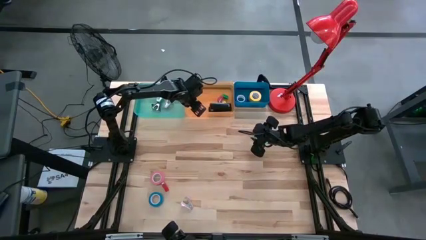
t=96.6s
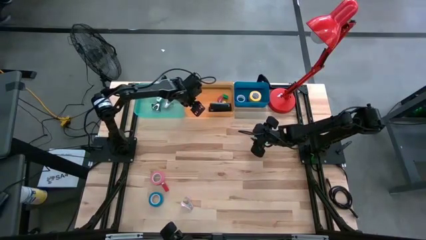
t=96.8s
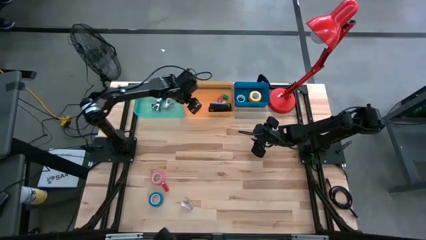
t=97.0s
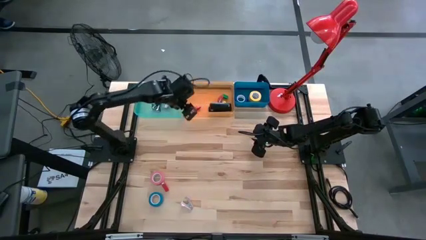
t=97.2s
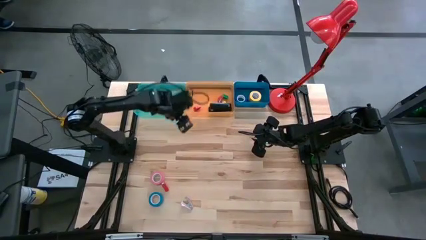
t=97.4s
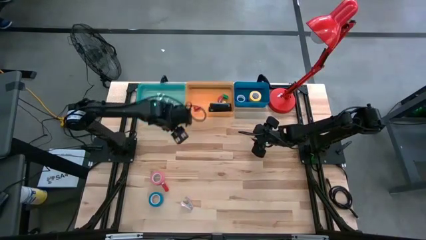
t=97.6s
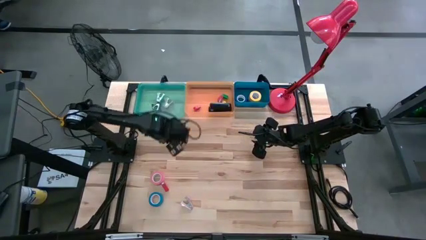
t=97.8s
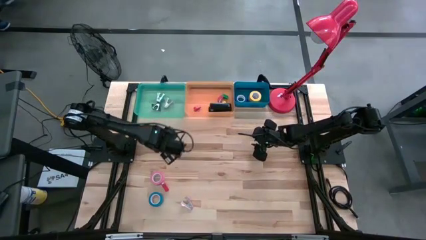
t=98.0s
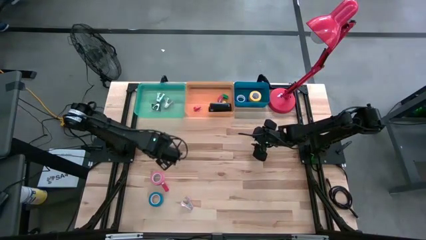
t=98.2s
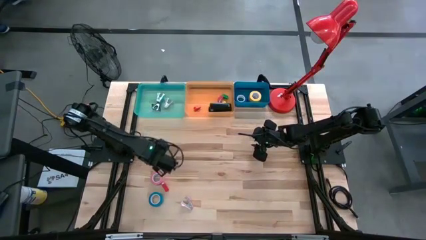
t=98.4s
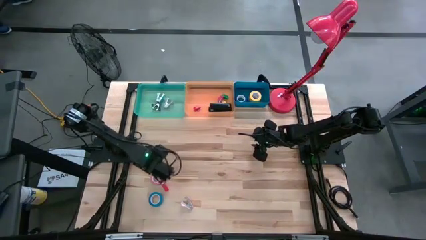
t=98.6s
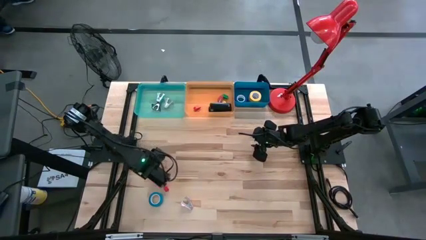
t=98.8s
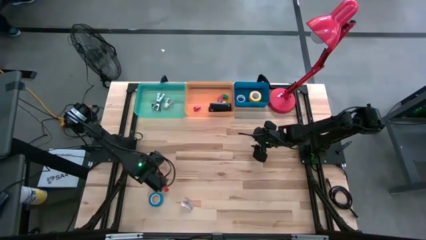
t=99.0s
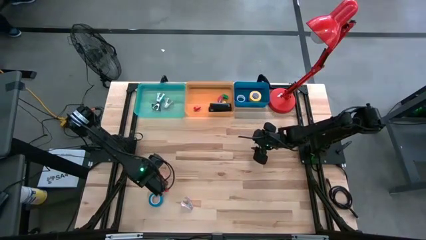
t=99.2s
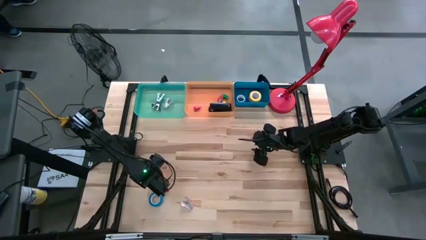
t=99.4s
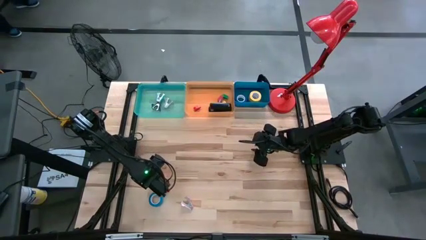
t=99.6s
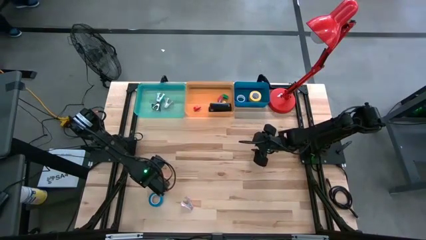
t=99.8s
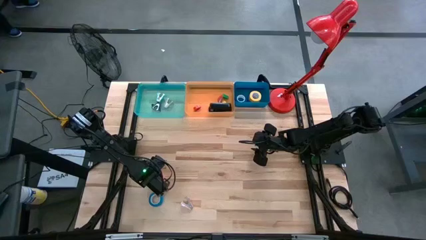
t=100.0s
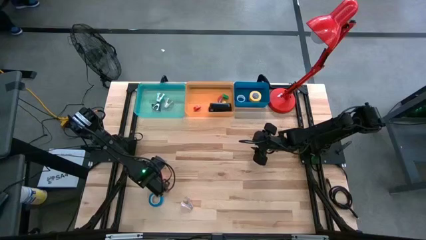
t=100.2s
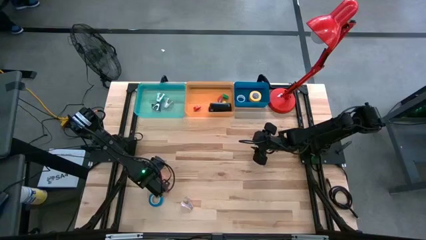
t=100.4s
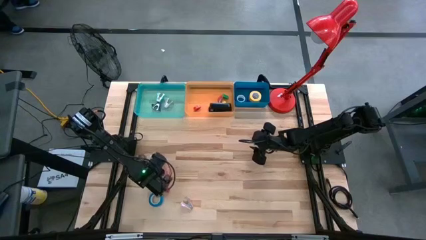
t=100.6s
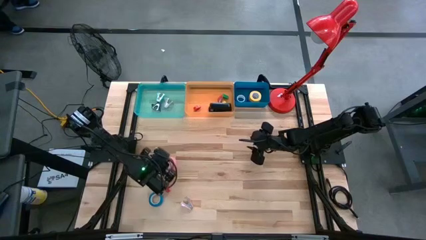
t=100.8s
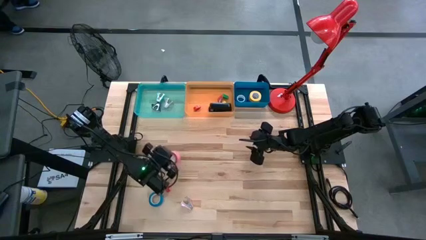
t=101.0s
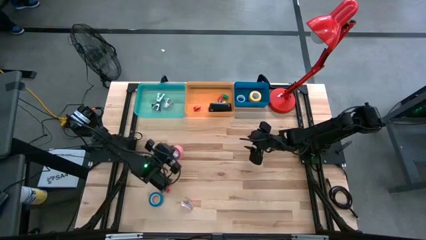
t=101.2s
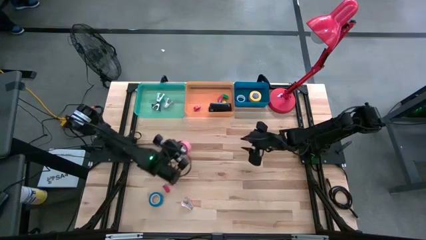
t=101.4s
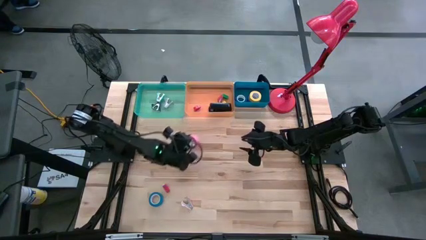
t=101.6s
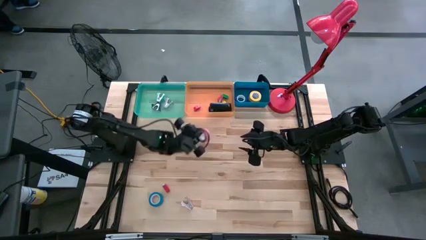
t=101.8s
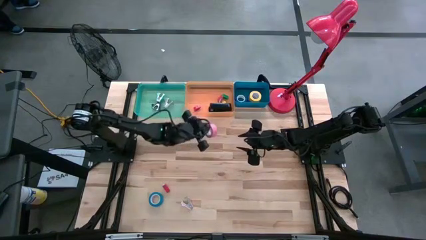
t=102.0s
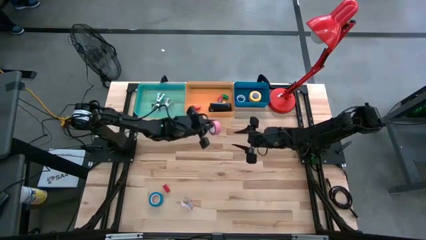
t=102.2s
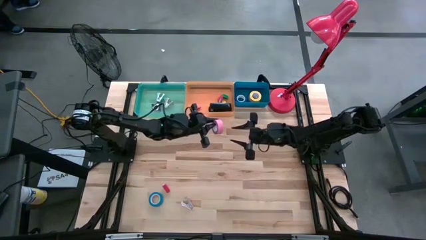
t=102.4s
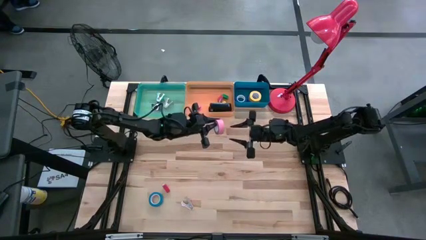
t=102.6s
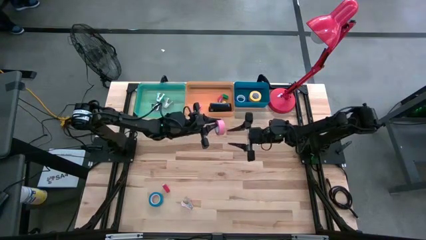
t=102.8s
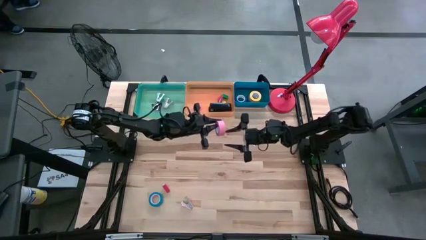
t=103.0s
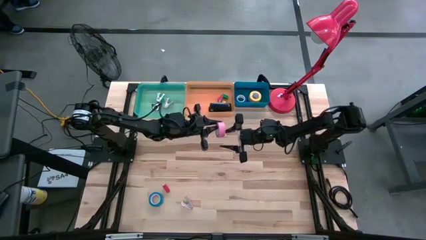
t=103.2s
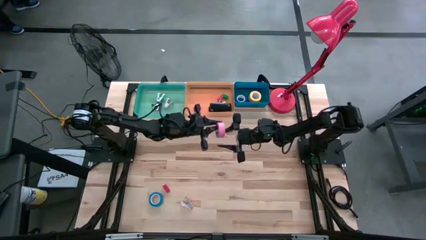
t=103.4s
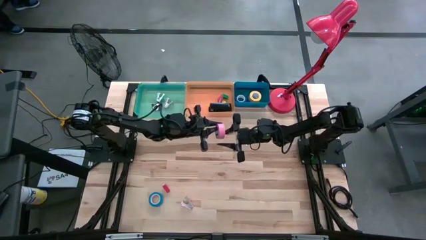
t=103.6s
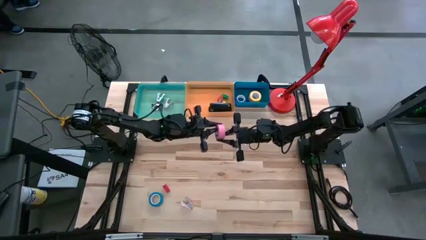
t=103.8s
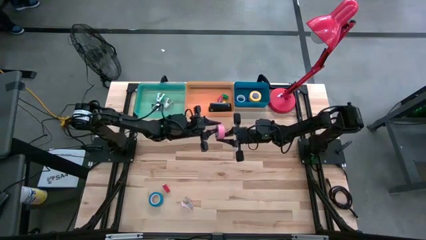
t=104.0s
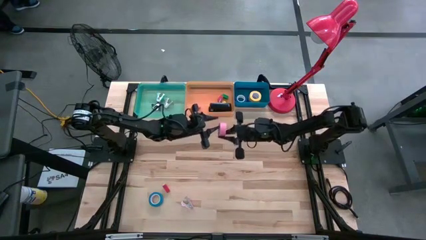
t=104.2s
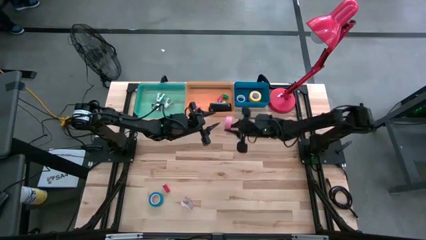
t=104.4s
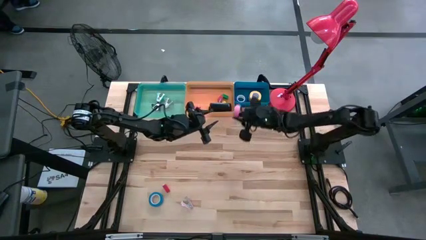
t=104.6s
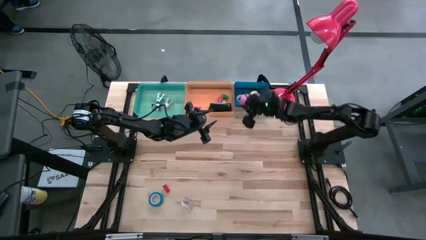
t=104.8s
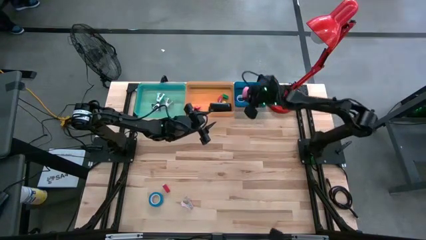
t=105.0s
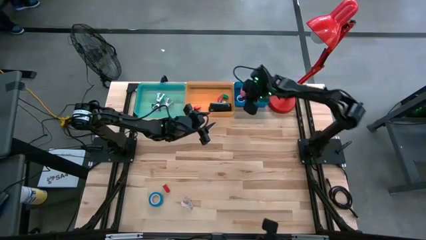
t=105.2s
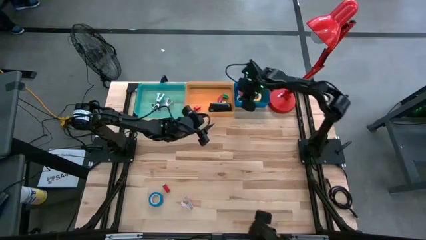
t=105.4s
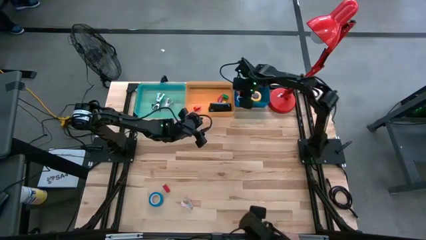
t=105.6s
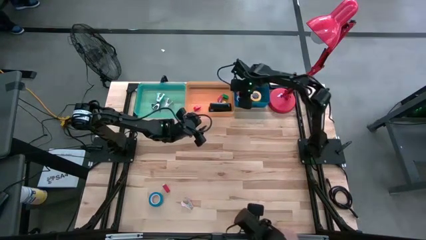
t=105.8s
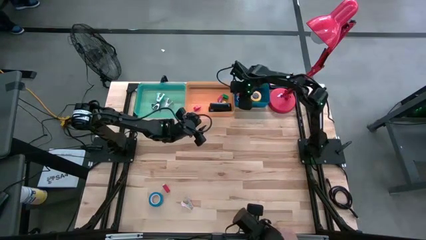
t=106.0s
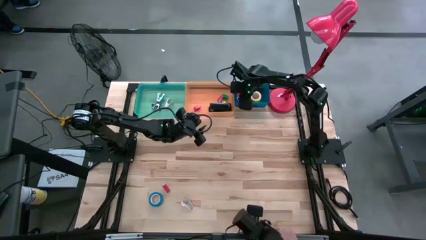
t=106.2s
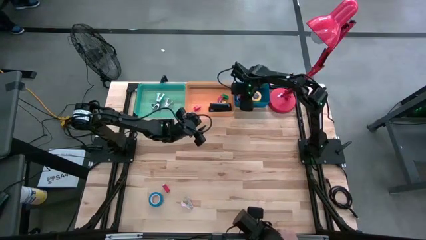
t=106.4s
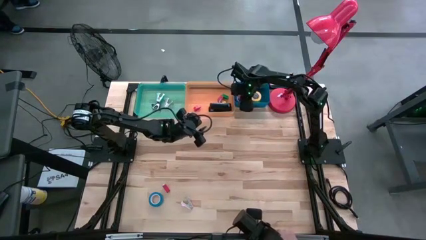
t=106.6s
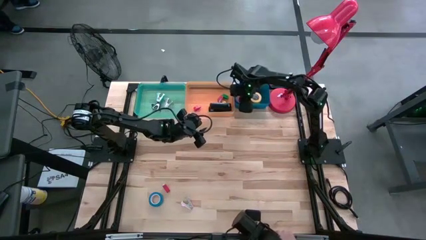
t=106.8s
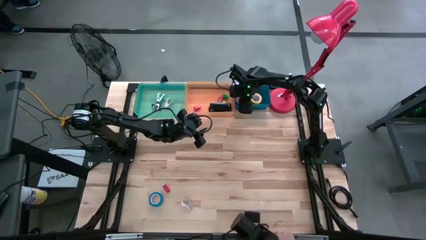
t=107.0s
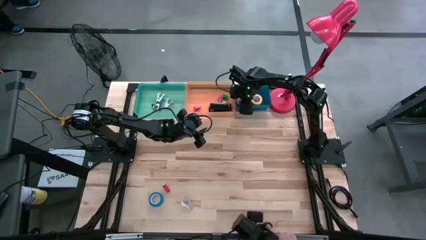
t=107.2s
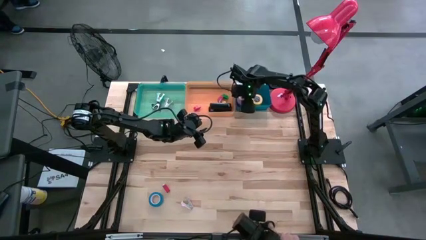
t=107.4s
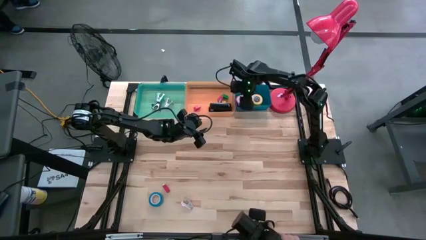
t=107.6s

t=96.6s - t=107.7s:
Task: Pick and place Stapler, Stapler remover, tape
Put the pink tape into the blue bin

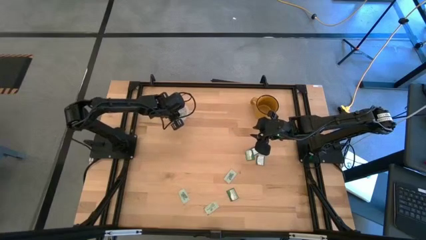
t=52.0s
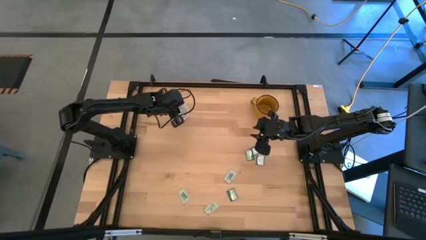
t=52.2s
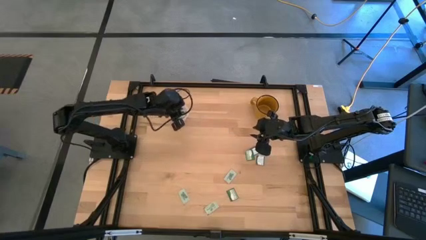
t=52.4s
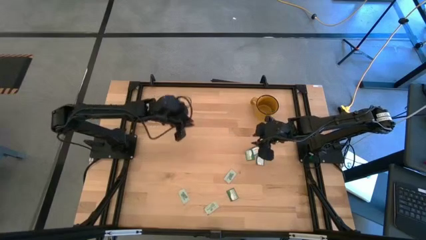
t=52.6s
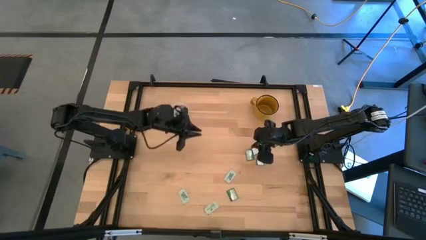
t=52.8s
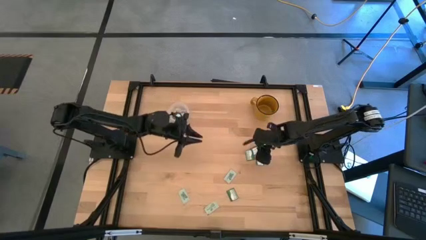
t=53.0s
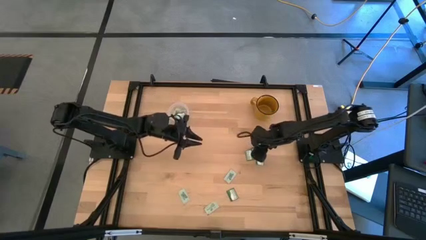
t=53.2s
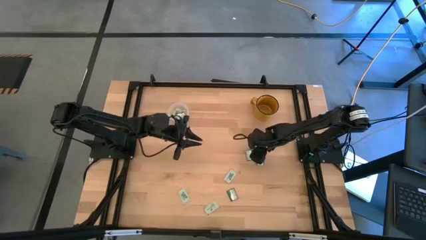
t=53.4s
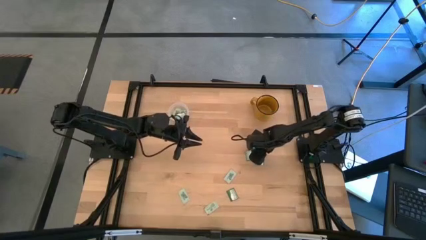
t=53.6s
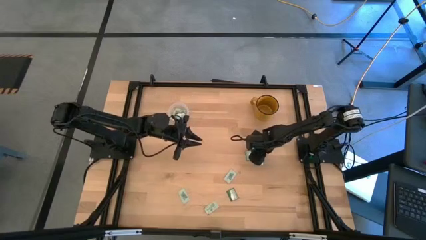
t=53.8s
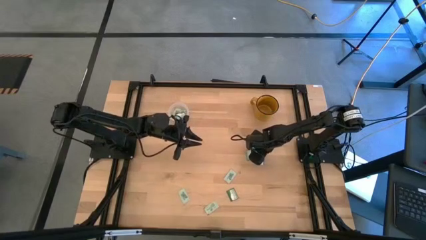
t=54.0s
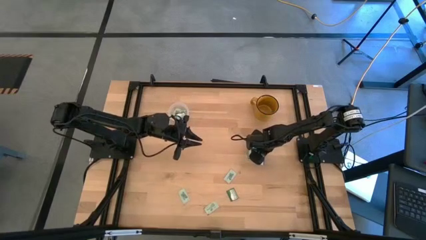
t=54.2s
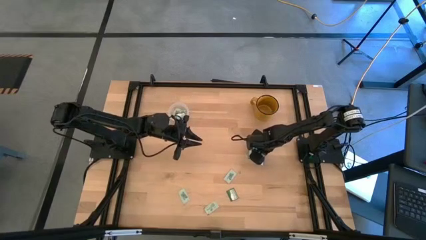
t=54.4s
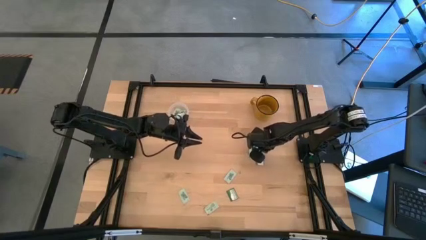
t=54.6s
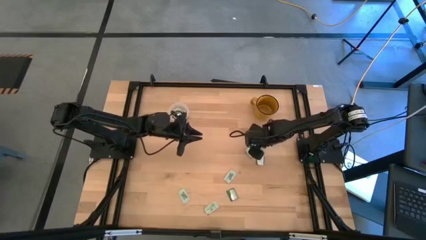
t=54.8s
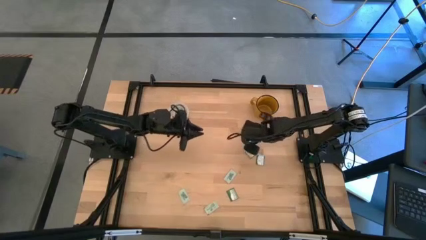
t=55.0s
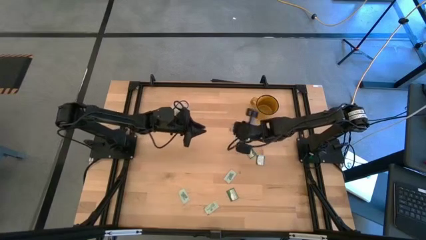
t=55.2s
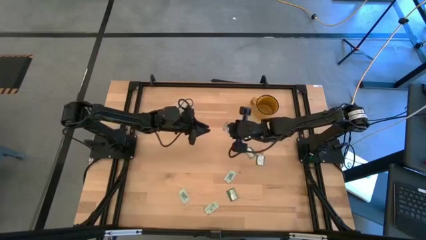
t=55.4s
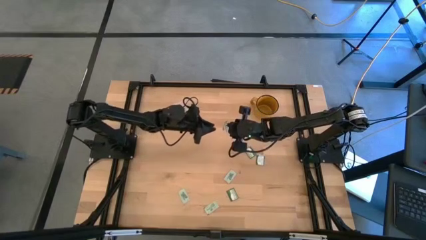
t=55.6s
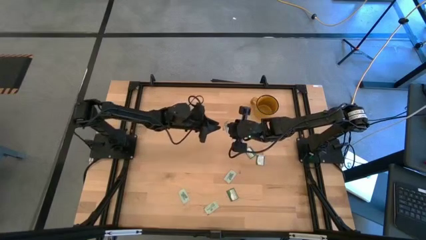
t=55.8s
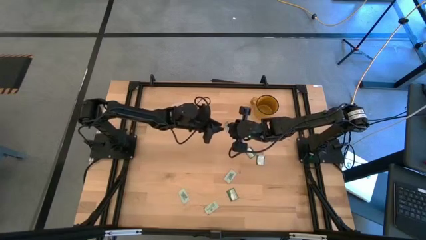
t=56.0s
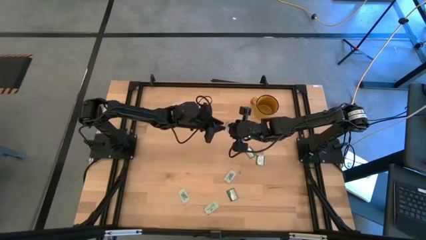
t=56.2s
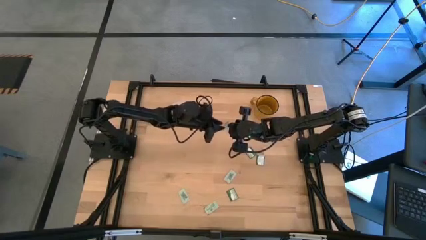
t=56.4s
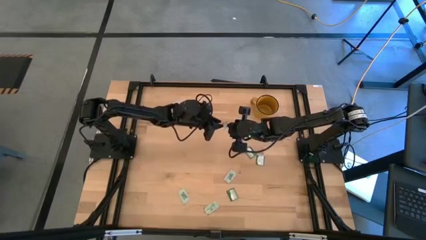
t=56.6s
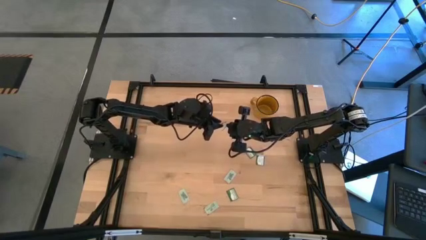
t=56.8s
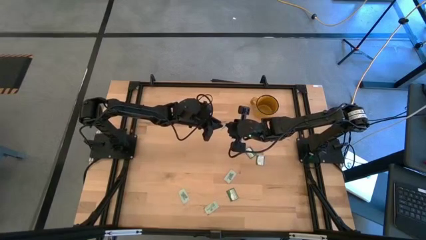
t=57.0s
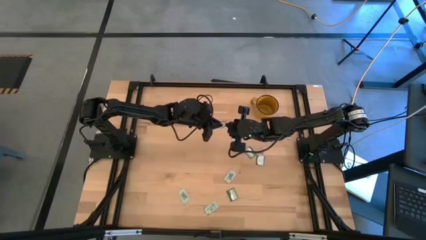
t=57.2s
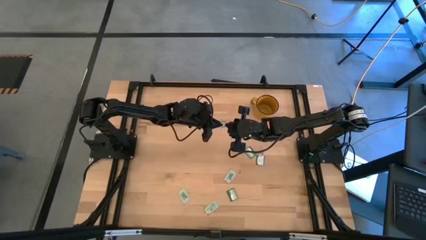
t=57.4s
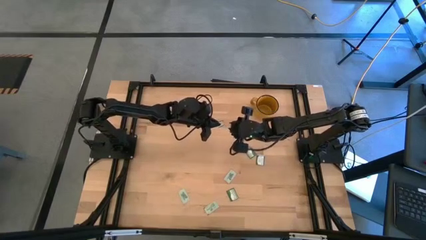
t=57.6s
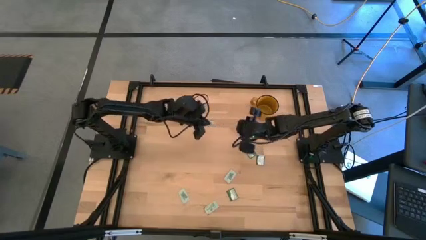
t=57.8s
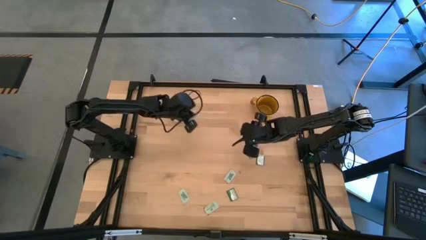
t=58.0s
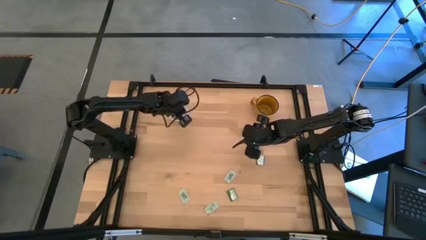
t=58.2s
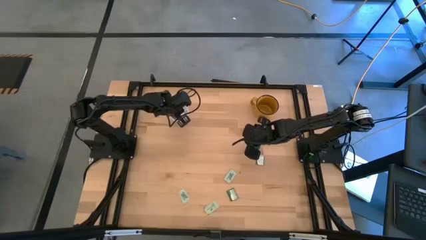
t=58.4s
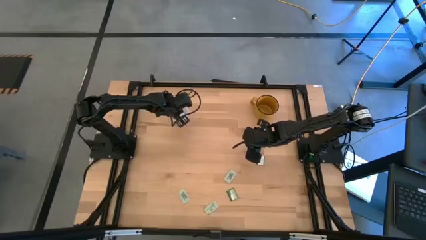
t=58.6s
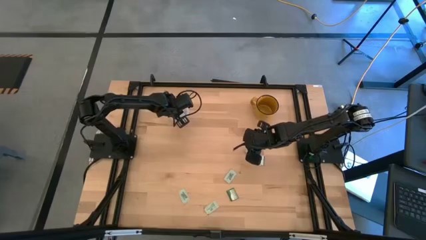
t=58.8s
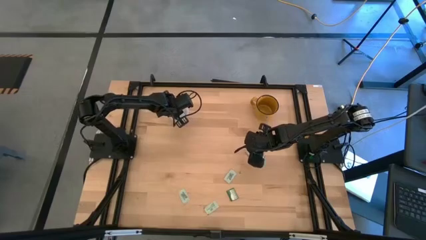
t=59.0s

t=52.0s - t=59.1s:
Task: Pick and place Stevia / Truvia into bins
Put the truvia packet into the transparent container
